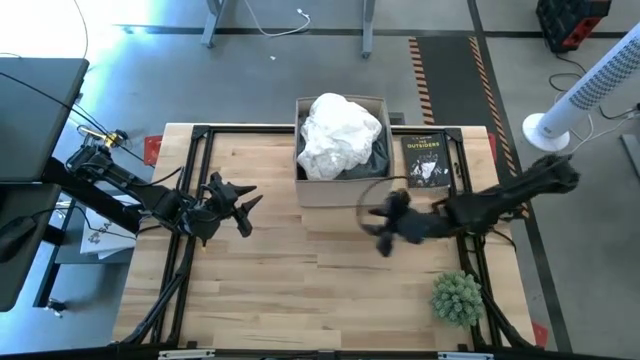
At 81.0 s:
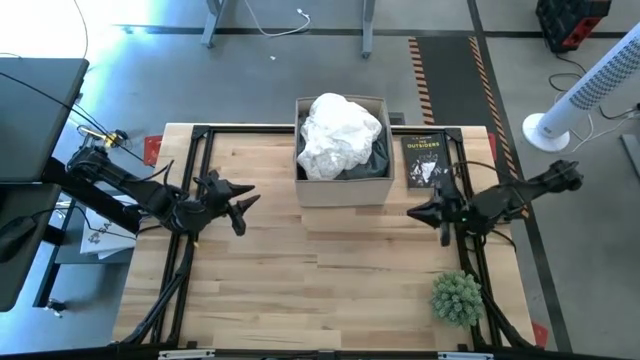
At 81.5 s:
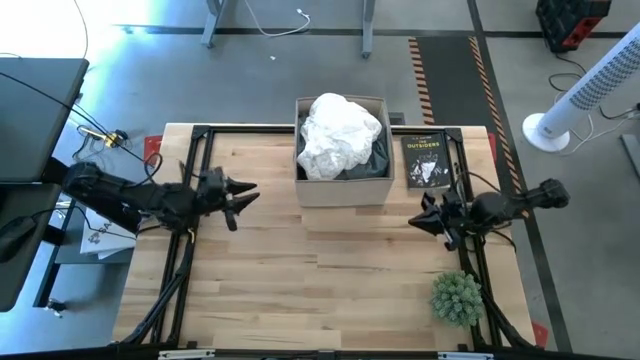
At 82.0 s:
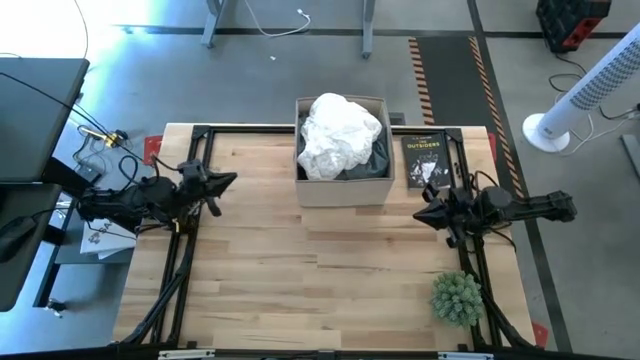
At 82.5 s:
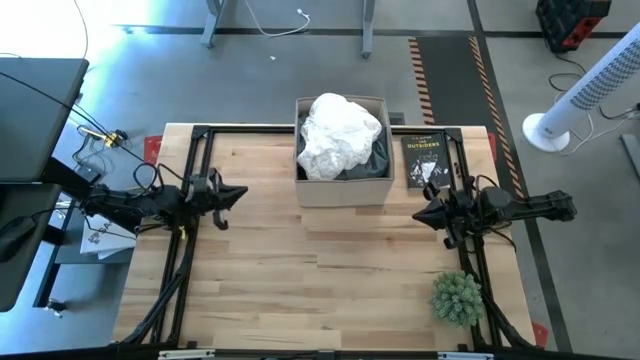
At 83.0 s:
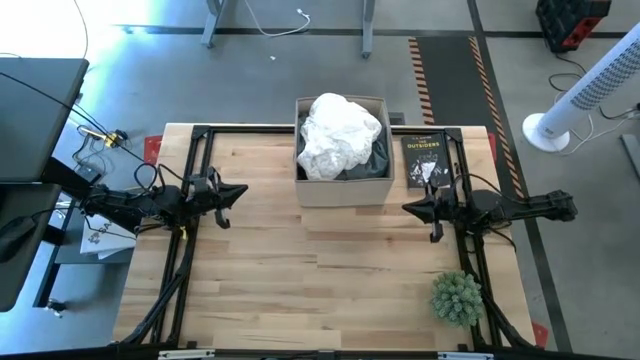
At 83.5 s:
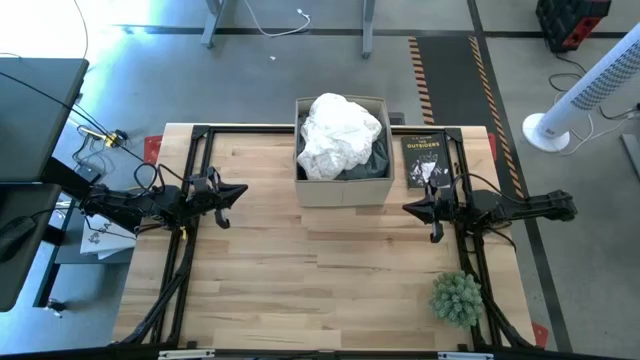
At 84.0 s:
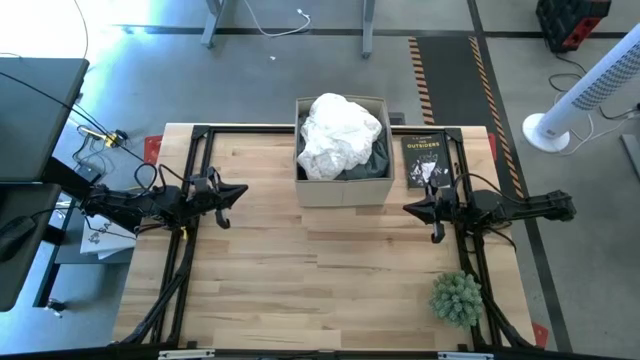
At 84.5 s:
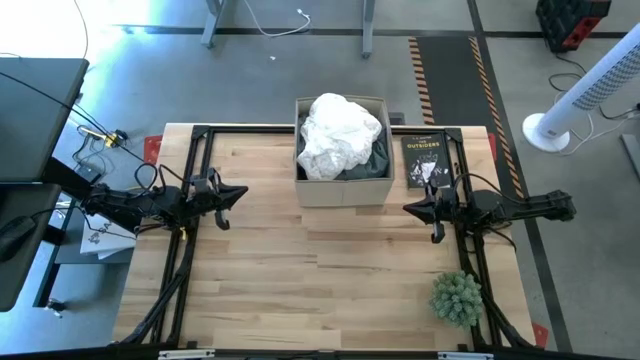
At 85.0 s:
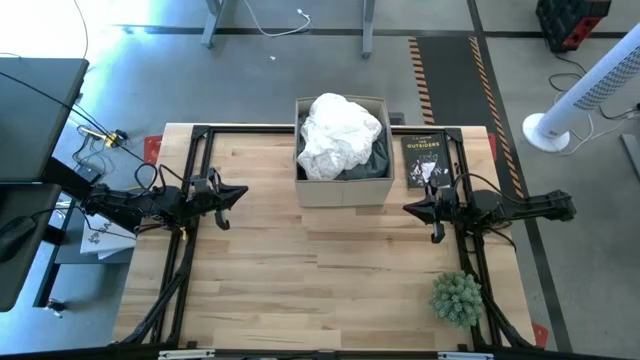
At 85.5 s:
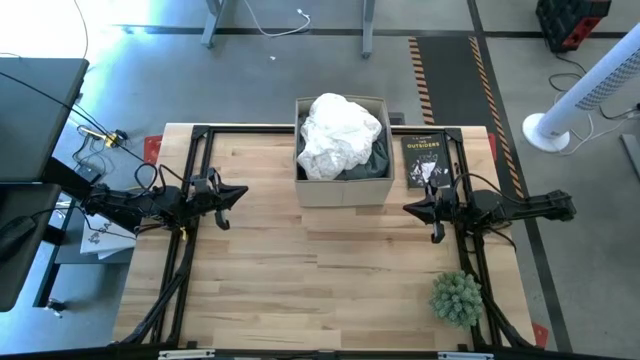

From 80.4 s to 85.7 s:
Task: Sort clothes
Return to Home Position

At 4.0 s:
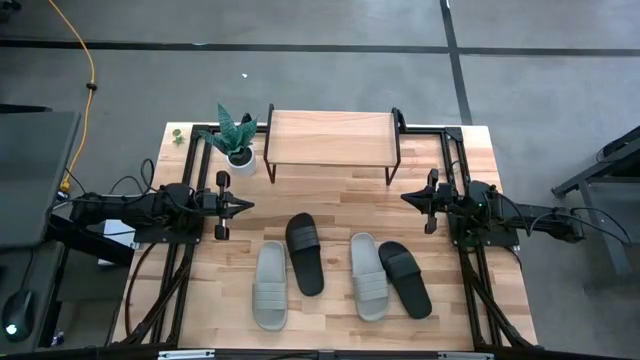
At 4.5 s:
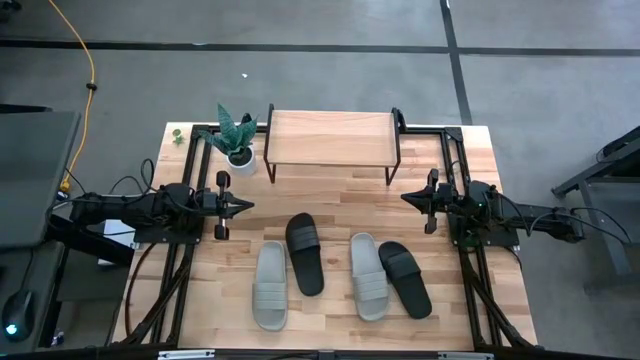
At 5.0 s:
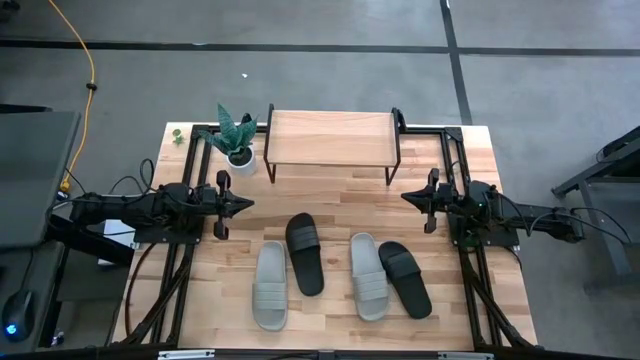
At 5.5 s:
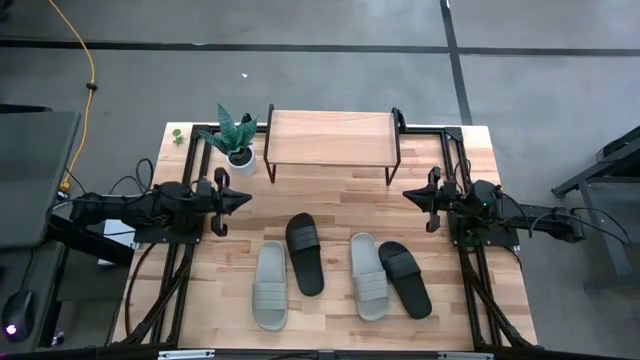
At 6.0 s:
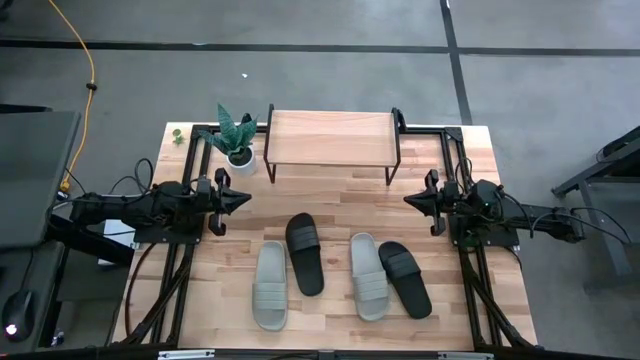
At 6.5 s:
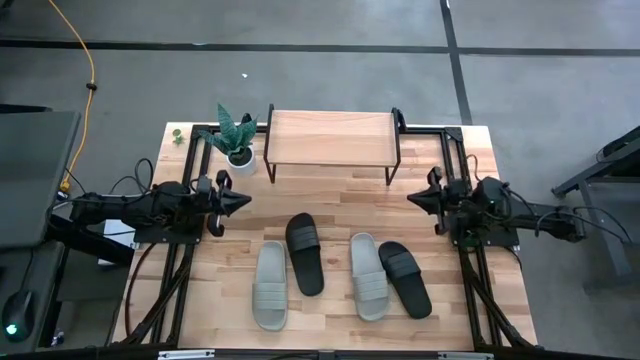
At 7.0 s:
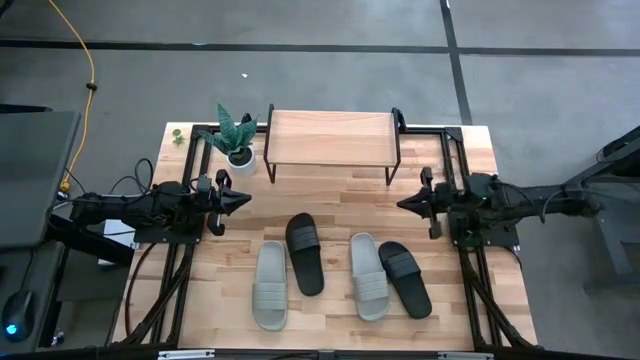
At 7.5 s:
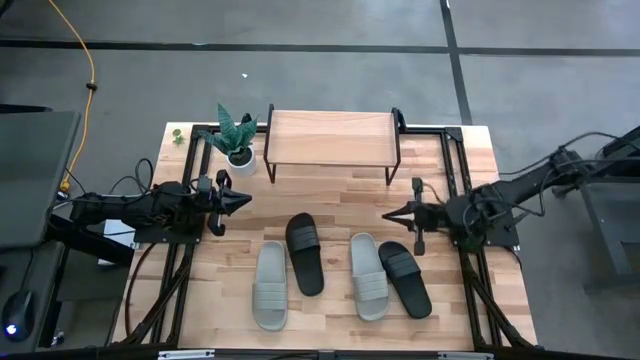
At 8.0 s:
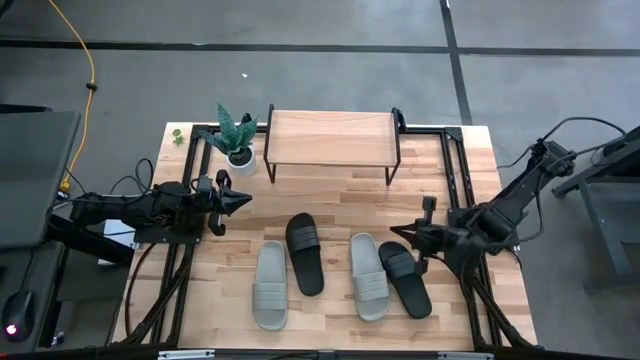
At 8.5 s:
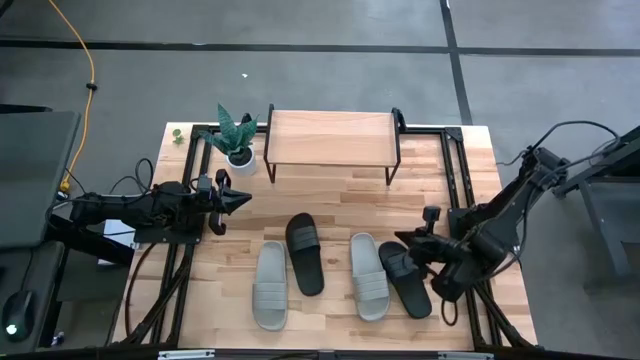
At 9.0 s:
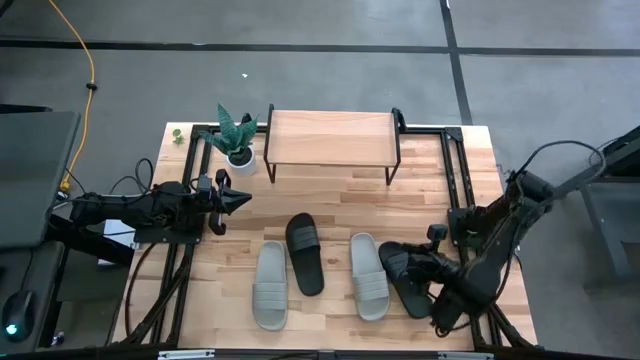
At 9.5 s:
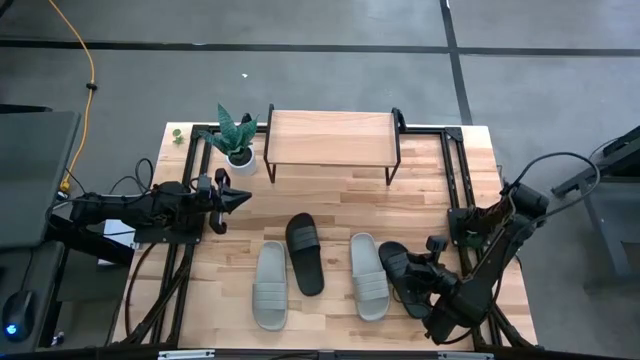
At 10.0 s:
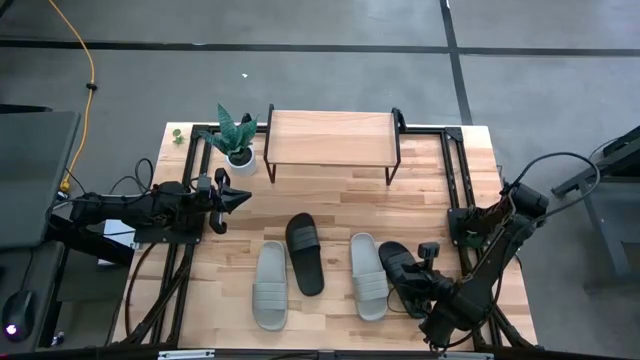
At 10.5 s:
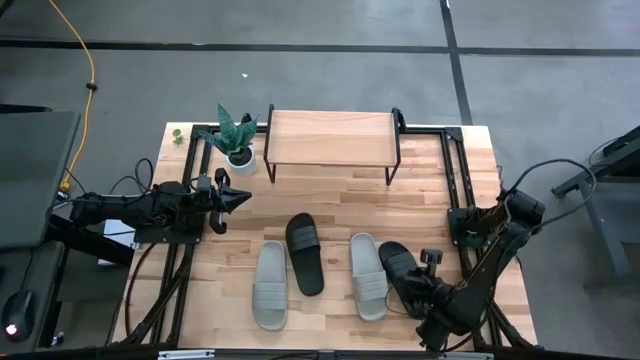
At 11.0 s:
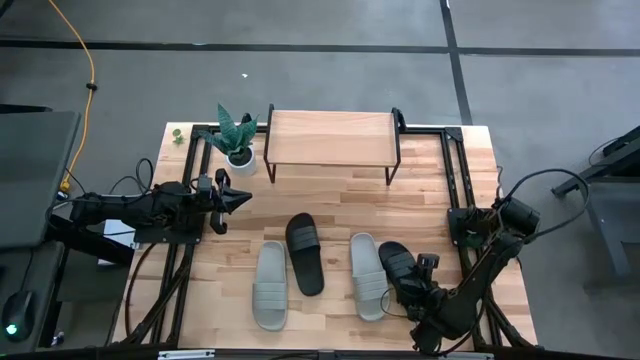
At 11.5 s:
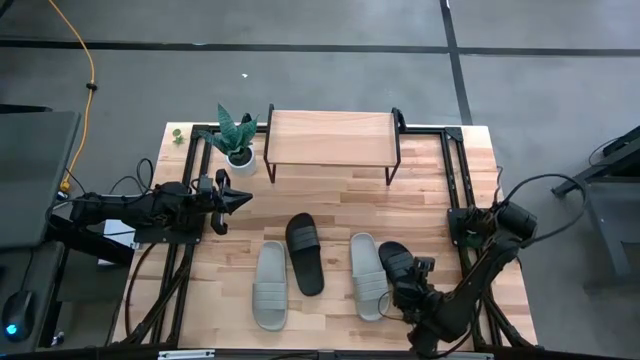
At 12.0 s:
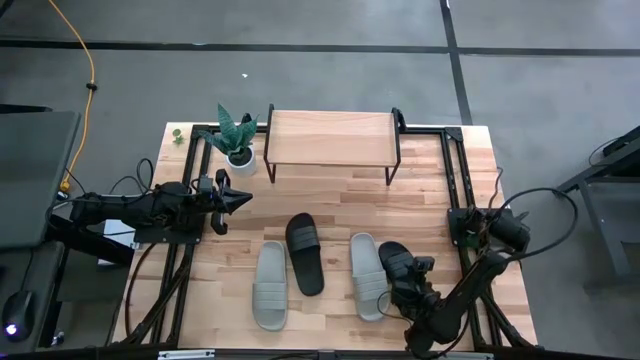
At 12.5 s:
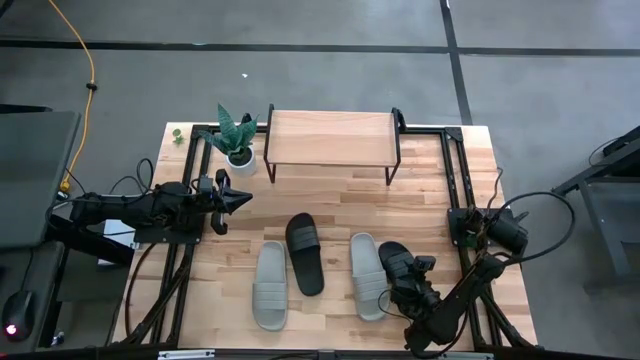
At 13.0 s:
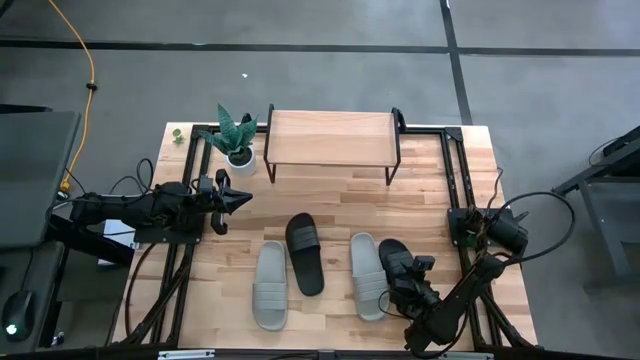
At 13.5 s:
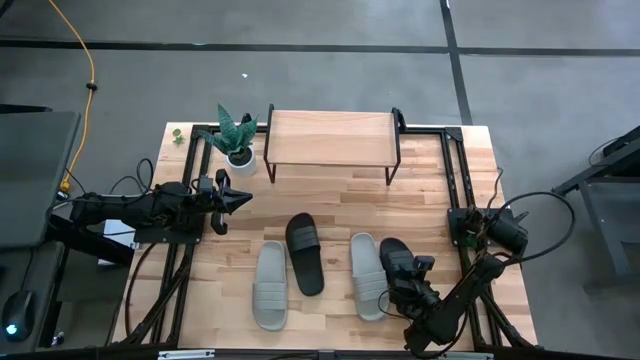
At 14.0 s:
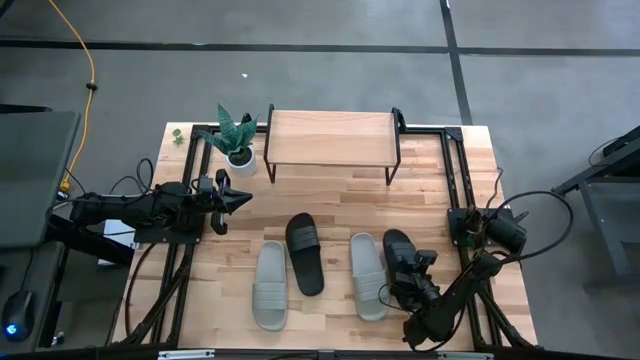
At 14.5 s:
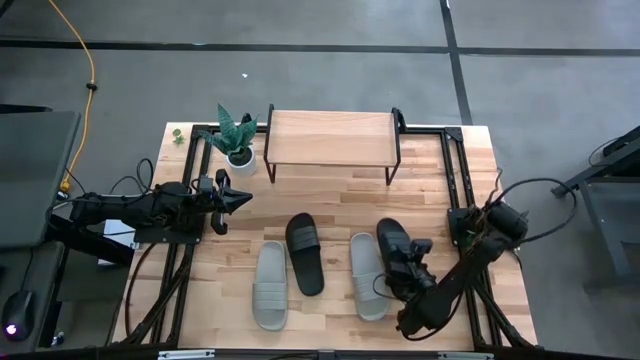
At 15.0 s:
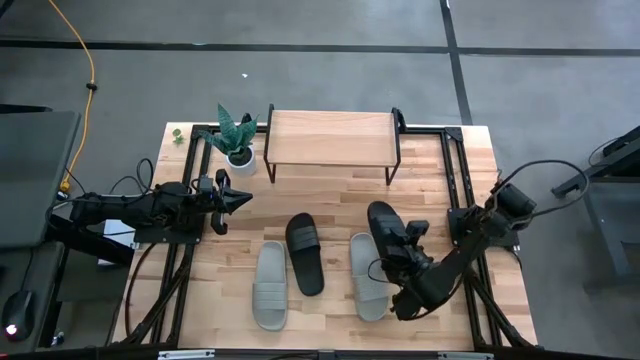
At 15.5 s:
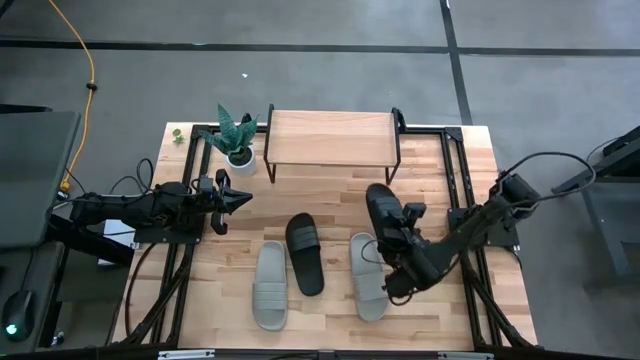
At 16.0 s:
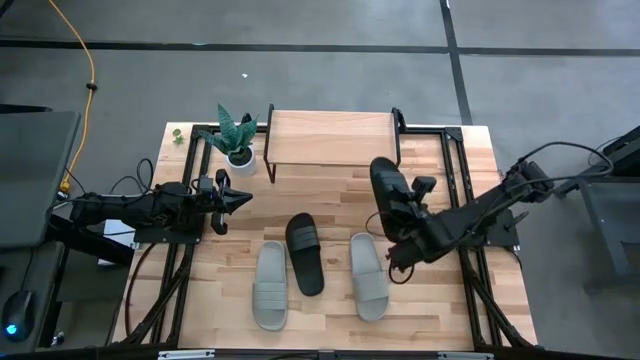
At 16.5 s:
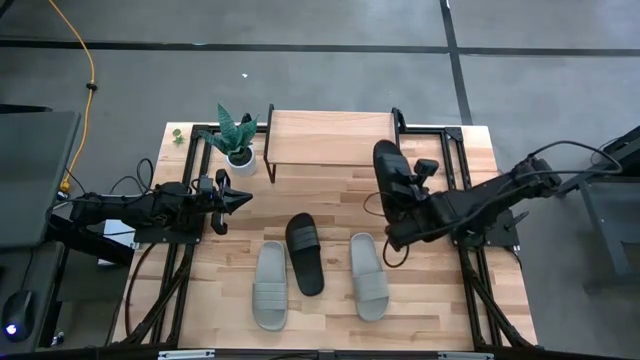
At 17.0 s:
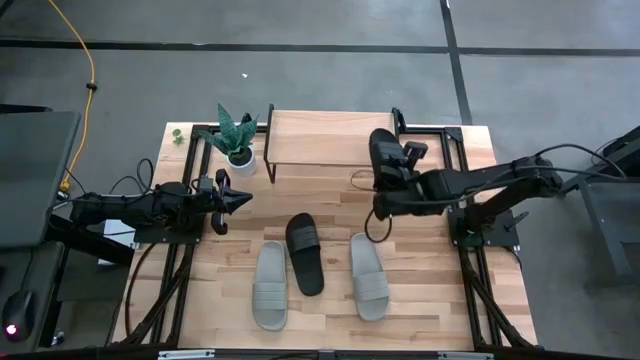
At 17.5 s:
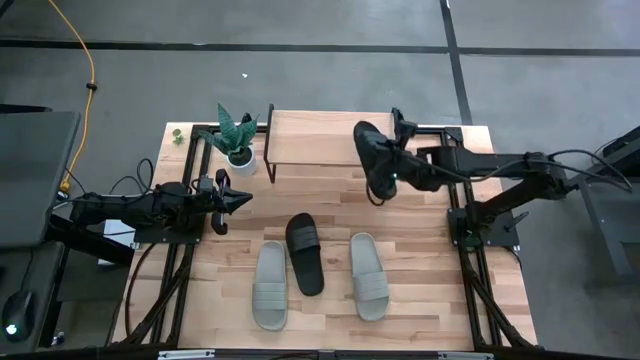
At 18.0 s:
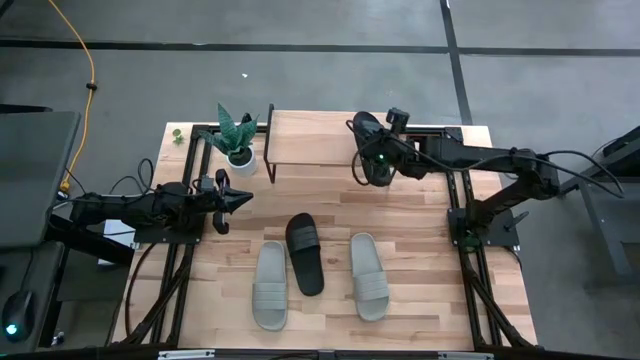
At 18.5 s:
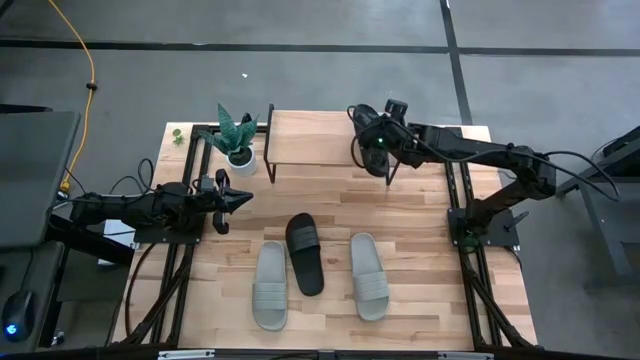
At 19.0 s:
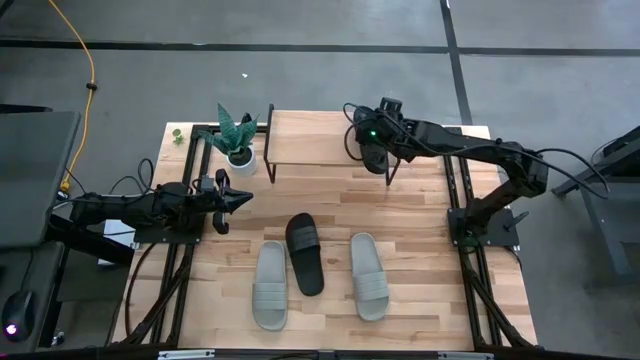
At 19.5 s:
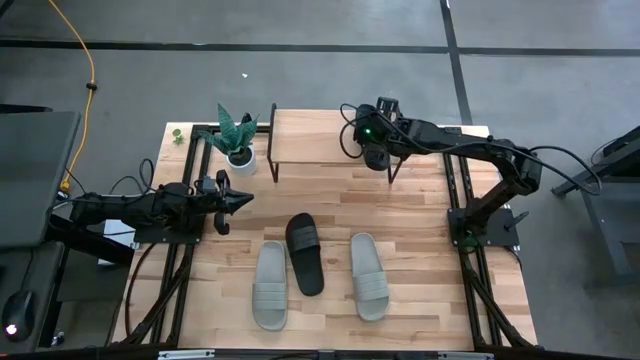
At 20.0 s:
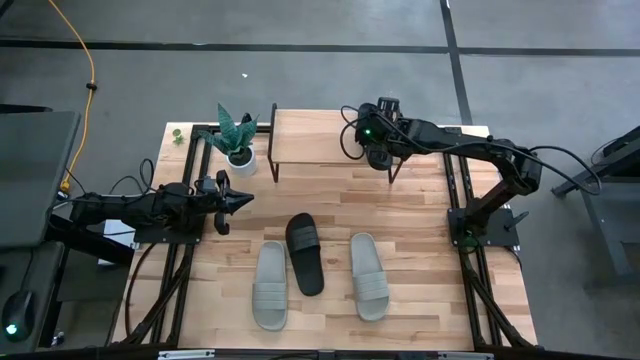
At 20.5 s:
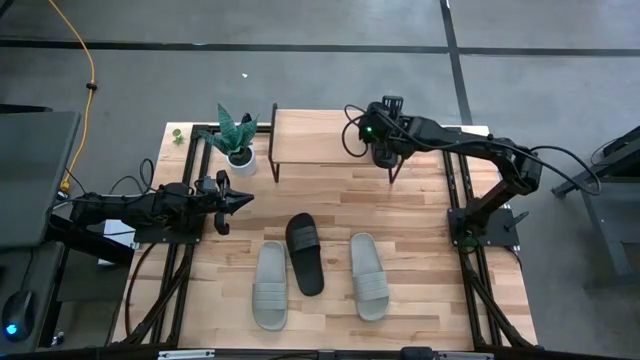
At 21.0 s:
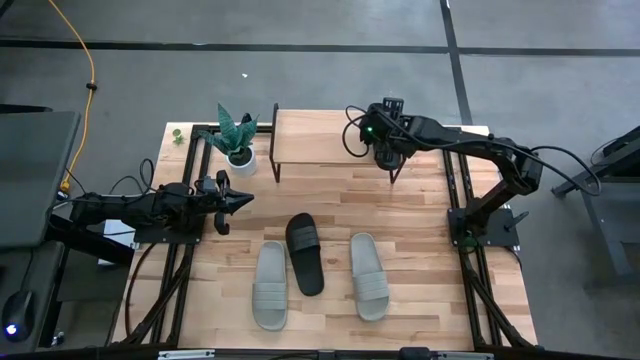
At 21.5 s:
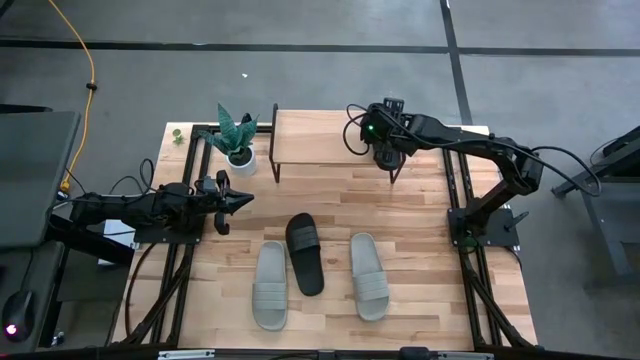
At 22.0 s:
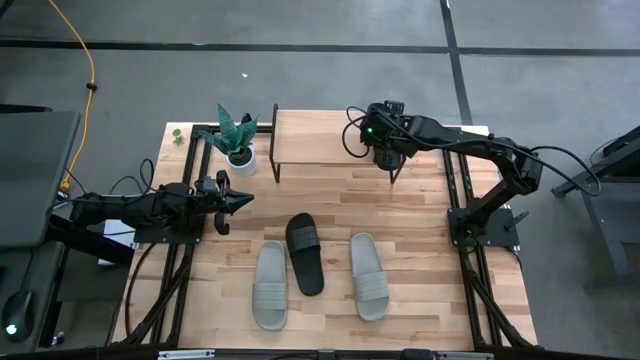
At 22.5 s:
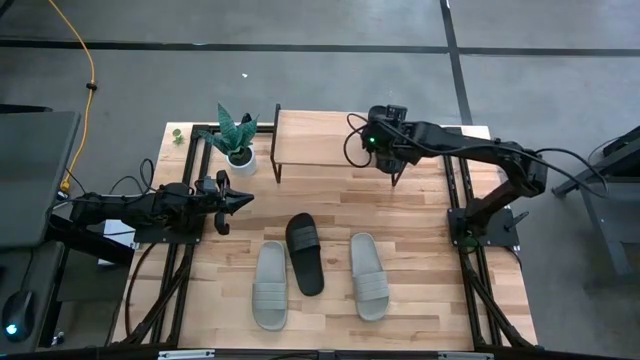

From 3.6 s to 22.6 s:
Task: Pick and place slides into the shelf
Put the right black slide on the shelf
